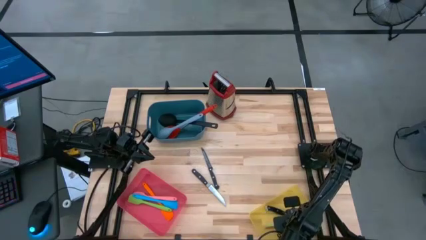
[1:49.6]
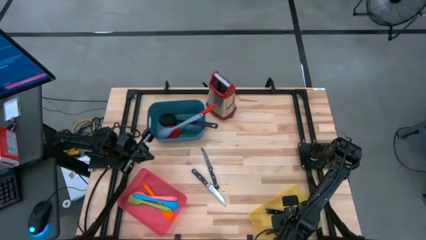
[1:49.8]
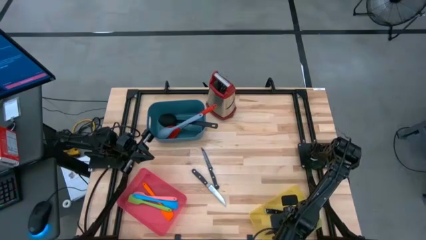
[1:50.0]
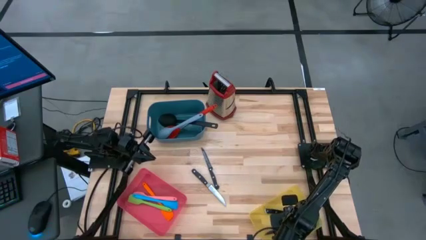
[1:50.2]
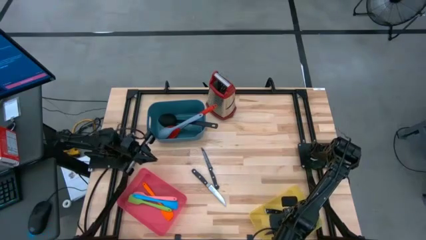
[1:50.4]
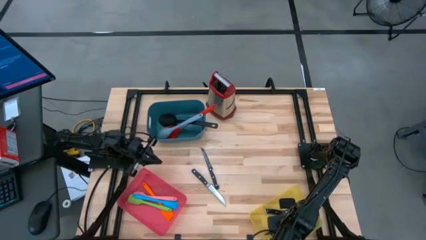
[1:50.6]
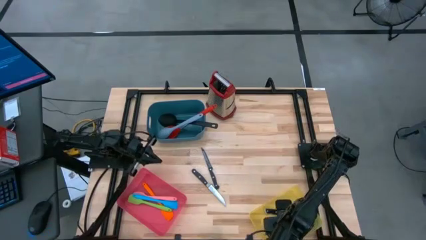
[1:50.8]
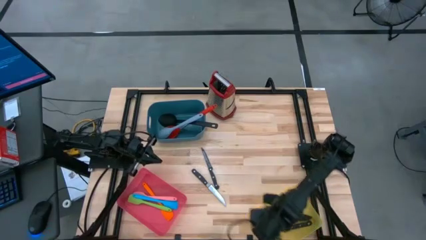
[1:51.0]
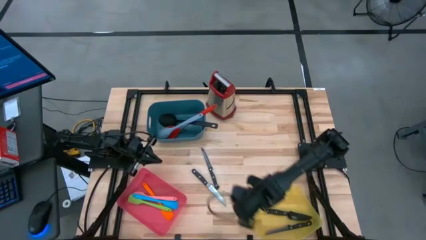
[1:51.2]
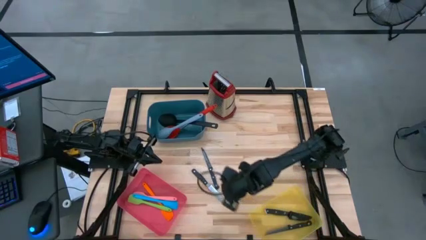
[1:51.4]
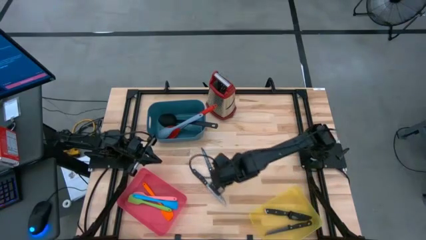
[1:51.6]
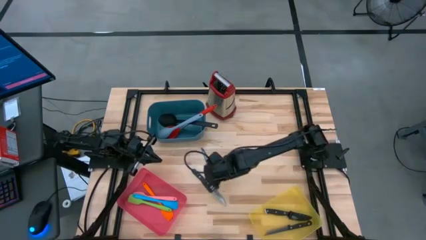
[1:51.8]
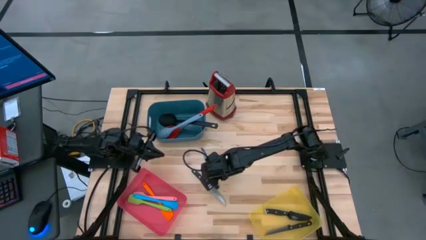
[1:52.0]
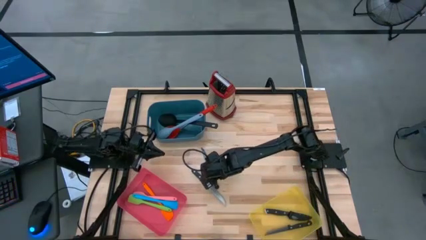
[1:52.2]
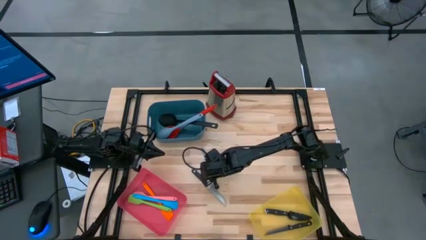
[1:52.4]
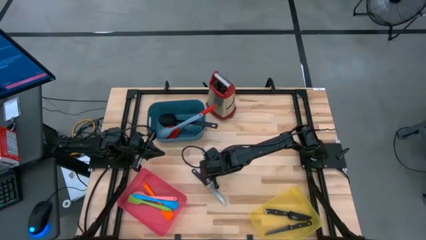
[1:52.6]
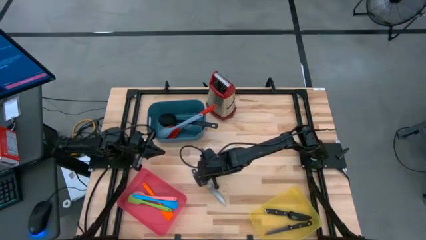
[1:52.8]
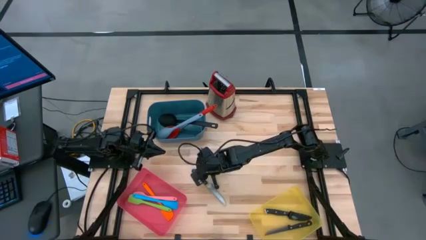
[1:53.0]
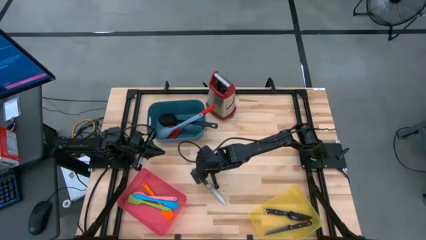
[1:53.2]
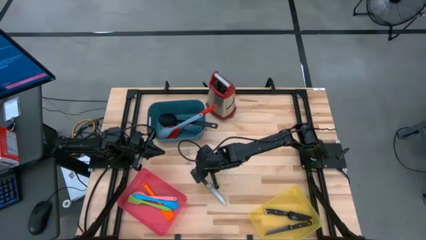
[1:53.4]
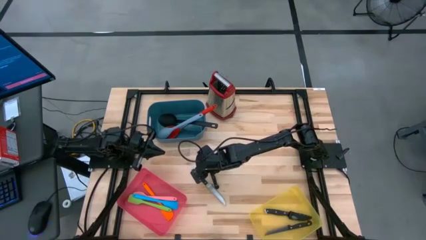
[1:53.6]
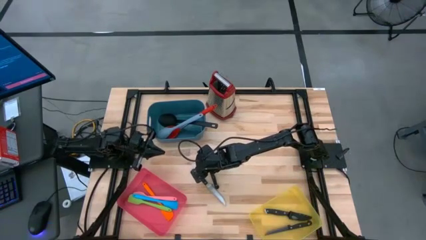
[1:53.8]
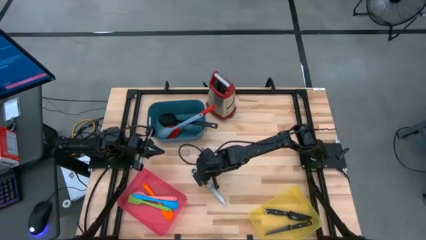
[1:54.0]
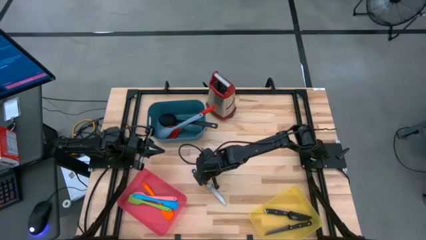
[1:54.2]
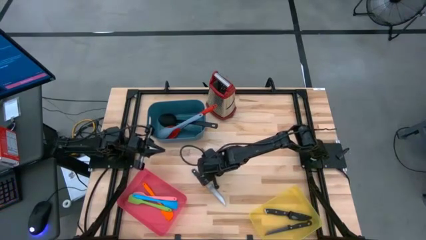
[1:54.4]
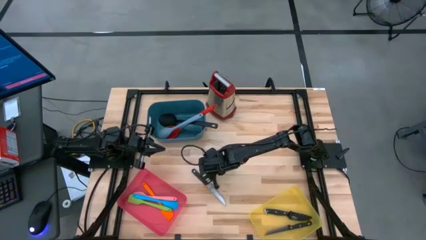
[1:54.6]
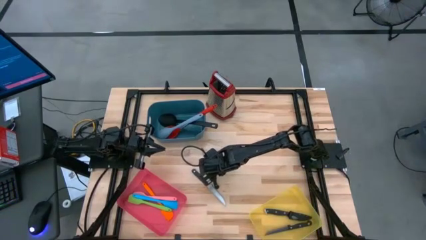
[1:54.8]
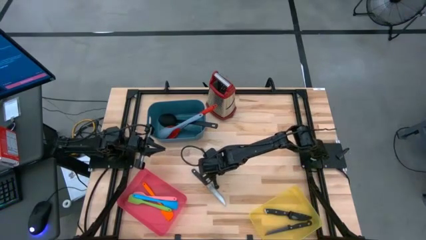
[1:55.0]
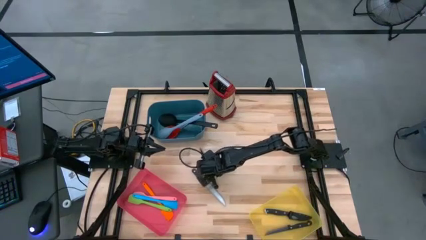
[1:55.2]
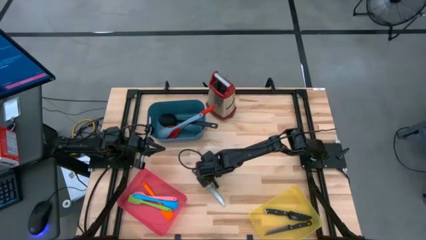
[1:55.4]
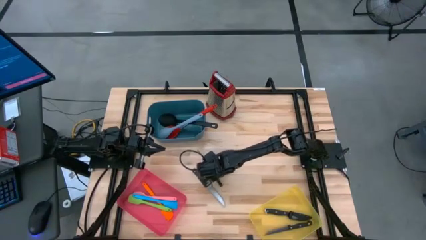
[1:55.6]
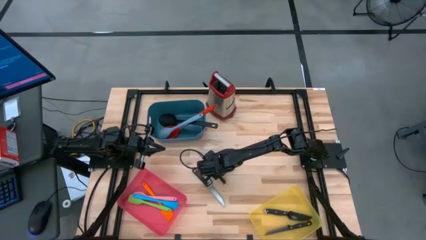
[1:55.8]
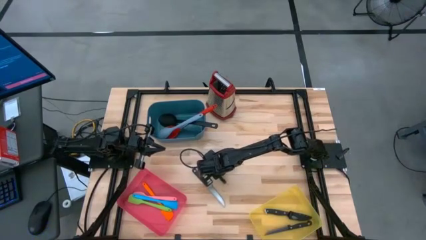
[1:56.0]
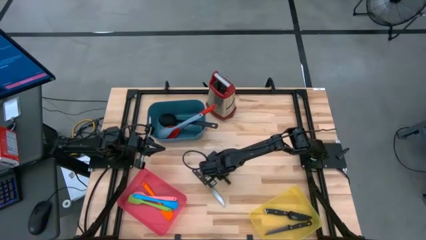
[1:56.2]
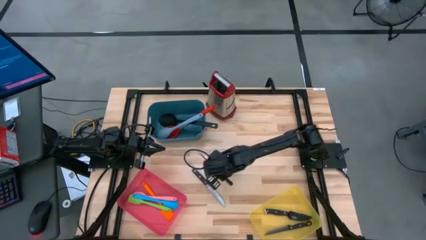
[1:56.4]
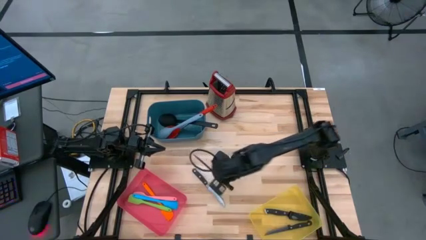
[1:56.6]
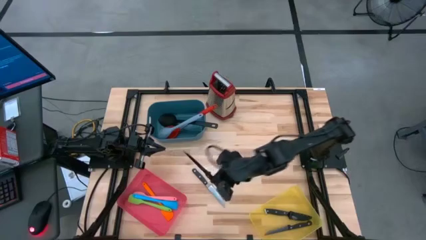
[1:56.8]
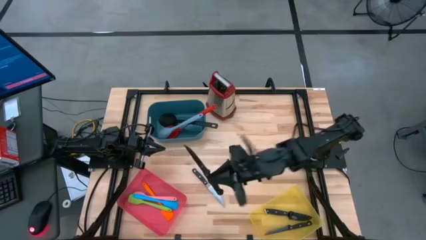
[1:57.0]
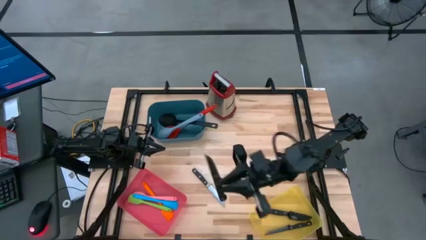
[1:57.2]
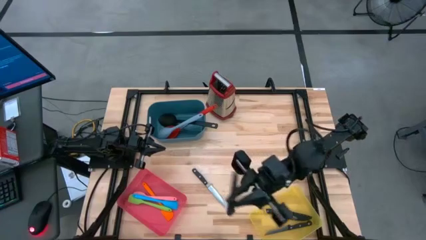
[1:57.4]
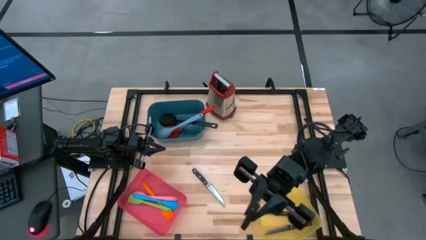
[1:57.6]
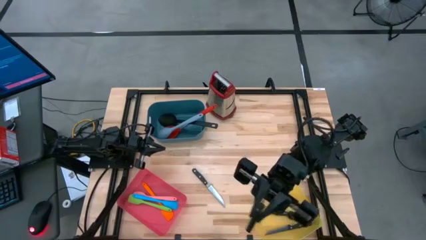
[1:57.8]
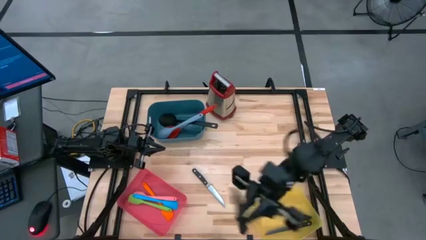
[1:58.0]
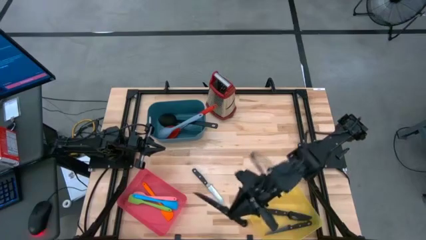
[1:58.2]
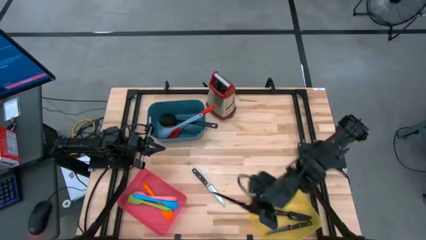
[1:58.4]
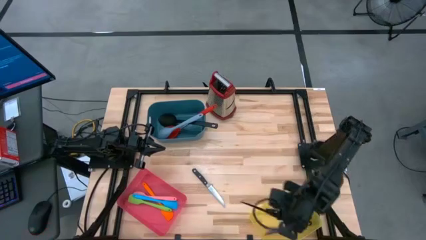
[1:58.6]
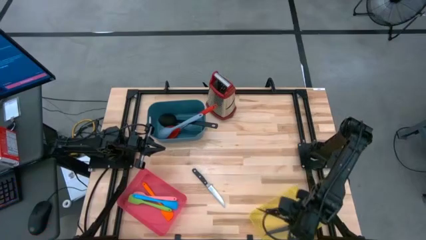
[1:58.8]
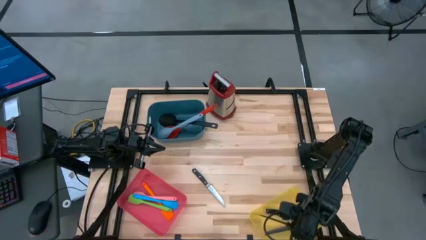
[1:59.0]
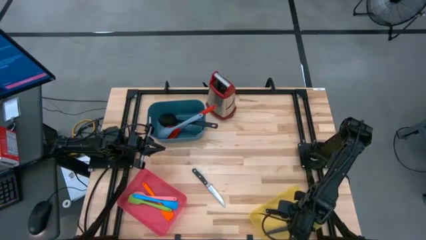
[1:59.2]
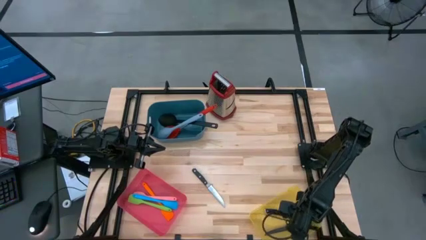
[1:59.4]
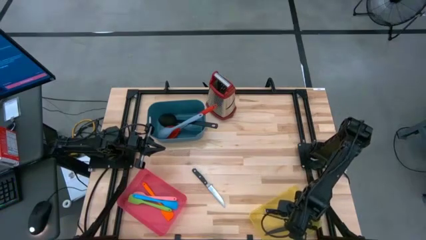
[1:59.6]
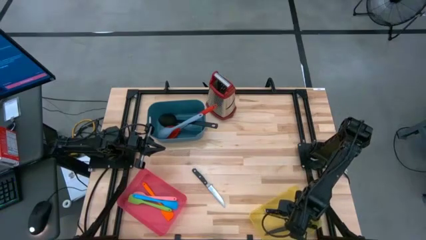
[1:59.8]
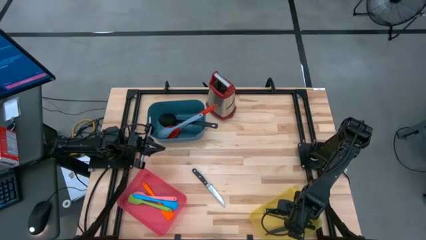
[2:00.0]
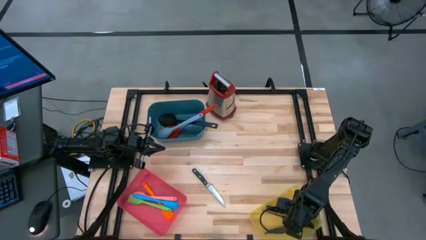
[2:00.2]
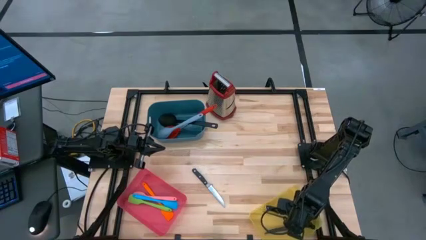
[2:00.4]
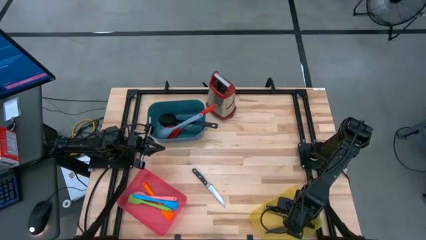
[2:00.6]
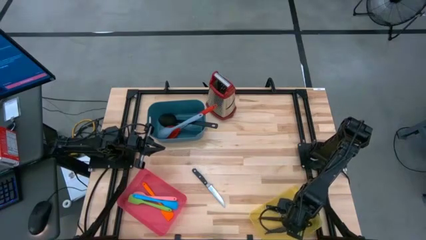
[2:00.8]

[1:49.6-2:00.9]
Task: Pick & Place Kitchen Items
Put the top silver table knife into the yellow bin

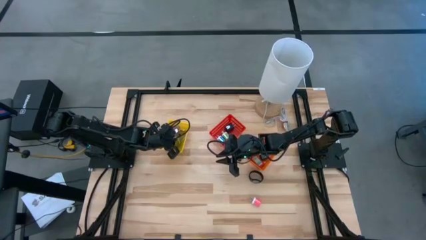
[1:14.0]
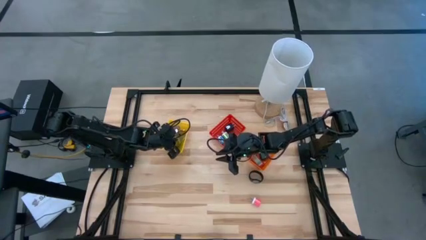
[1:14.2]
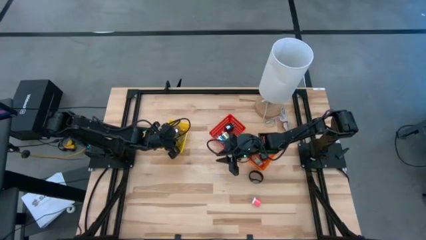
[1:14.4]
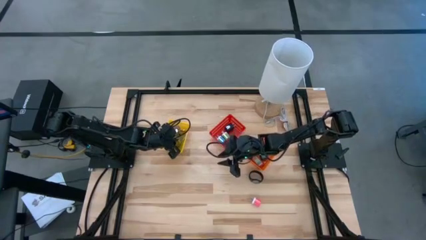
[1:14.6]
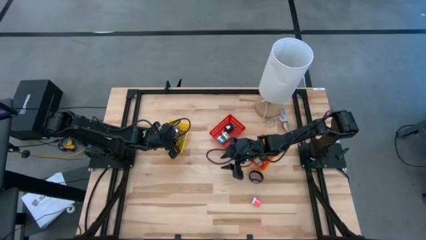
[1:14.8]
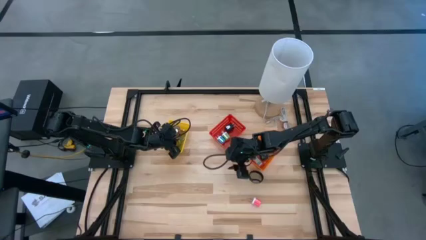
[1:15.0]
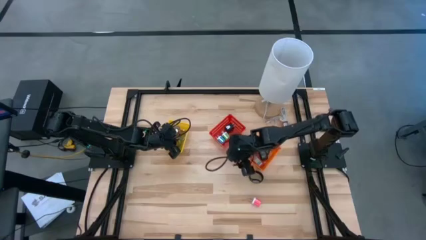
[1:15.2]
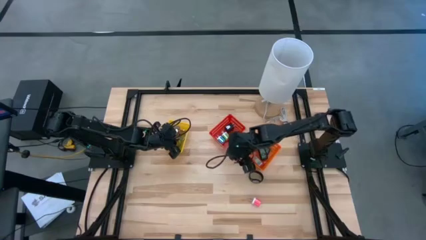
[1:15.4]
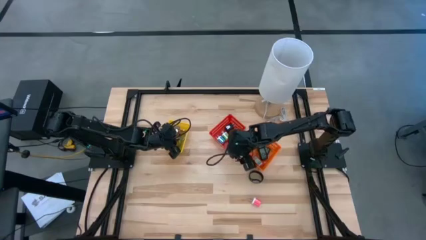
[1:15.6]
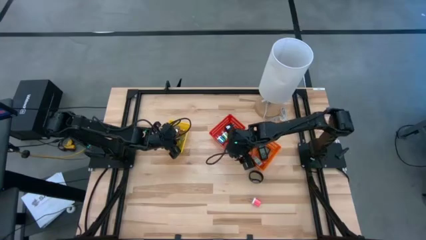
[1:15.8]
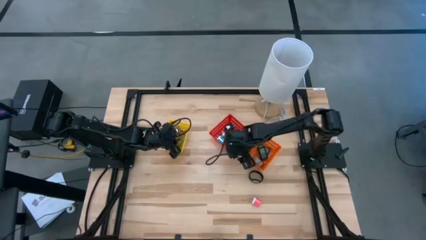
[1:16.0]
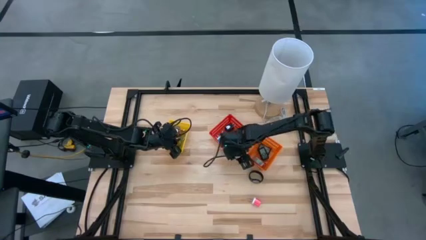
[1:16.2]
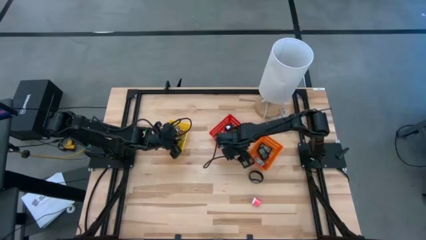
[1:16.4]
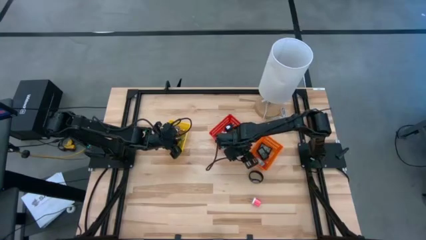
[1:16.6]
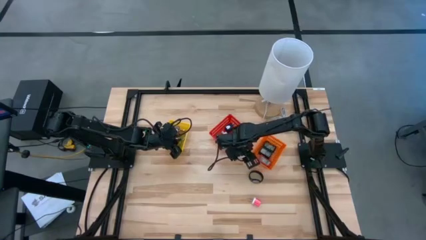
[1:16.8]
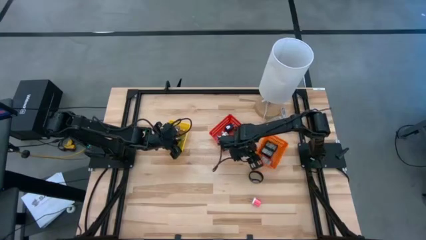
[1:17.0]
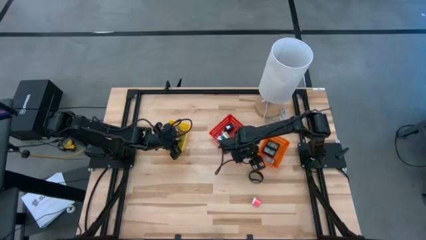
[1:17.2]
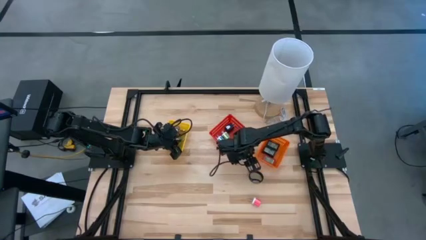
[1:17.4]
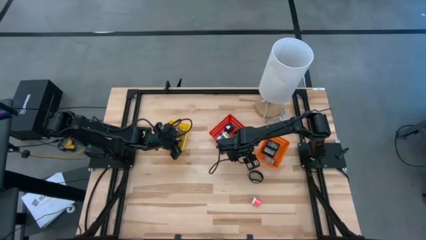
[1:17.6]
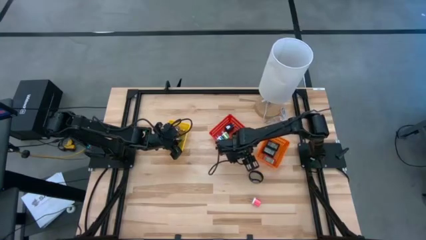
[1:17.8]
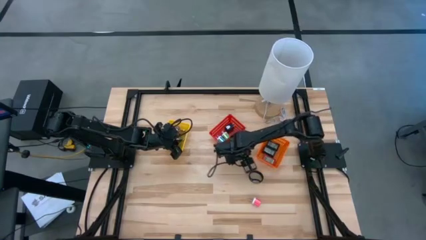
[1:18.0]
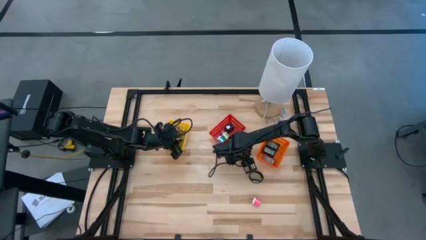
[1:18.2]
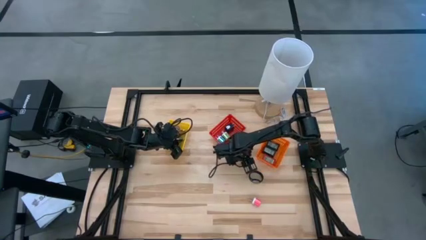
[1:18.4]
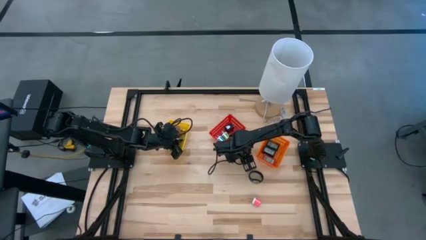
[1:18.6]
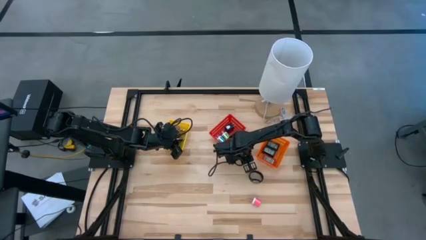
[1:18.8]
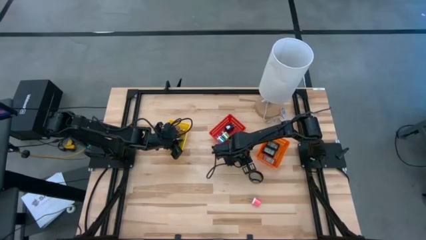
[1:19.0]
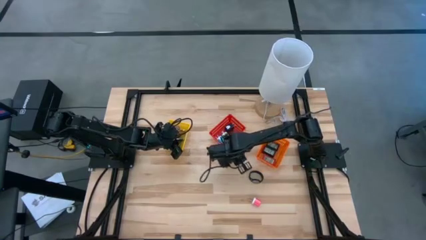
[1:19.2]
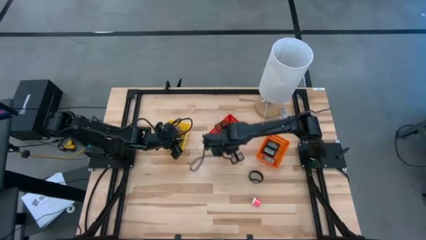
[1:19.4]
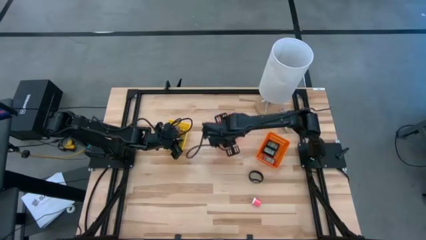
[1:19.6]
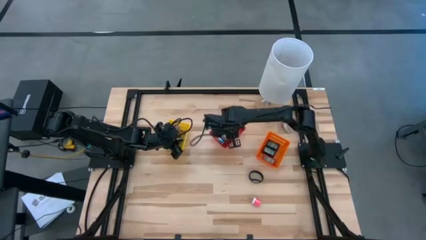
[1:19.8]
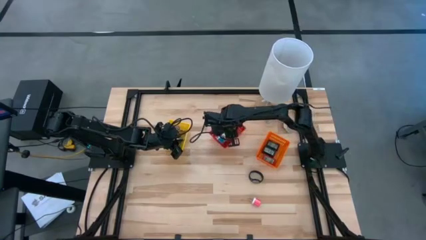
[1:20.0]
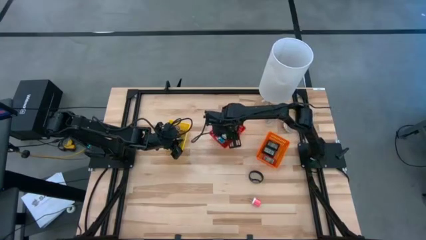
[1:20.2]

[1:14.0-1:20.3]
Task: Pick & Place Office items
Put the white charger adapter into the red bin
